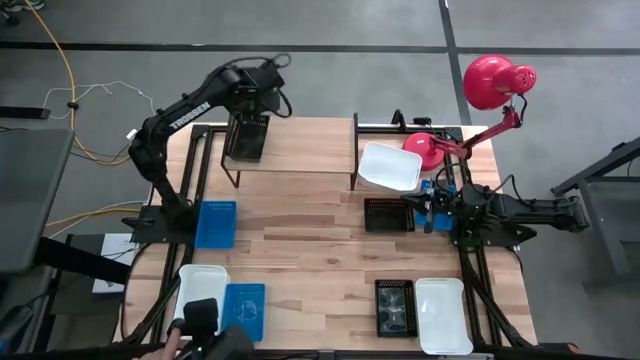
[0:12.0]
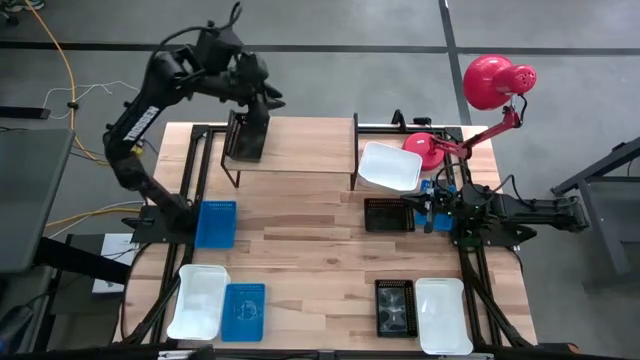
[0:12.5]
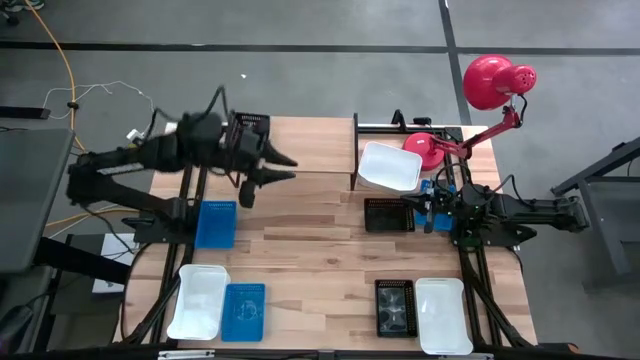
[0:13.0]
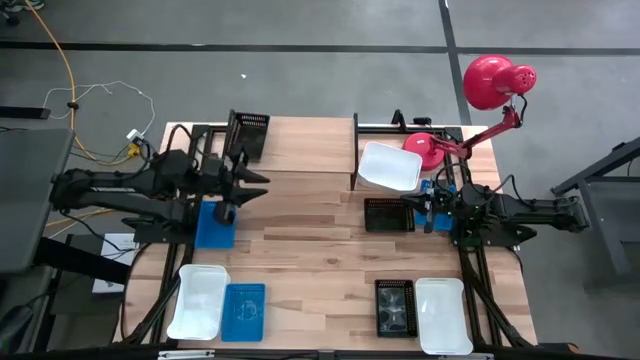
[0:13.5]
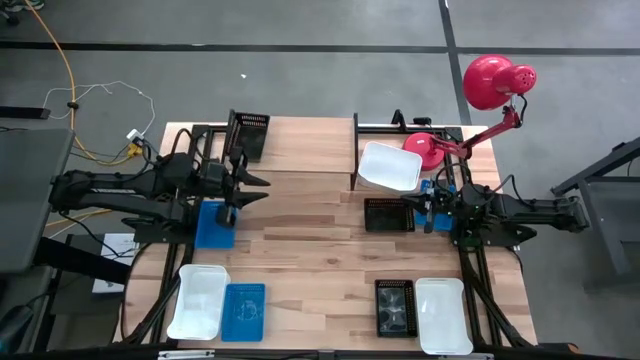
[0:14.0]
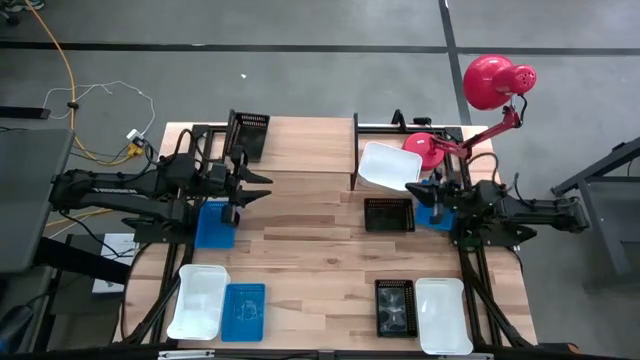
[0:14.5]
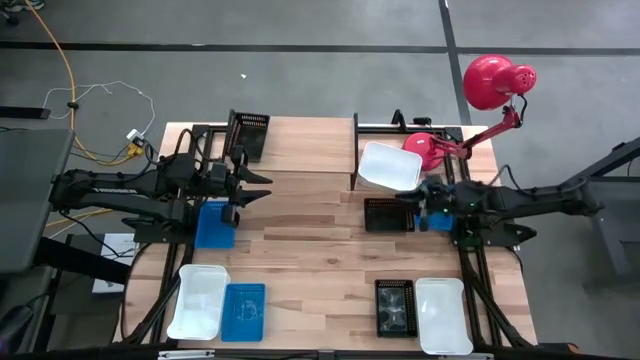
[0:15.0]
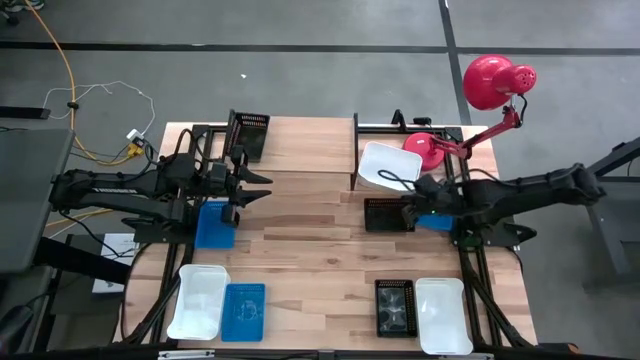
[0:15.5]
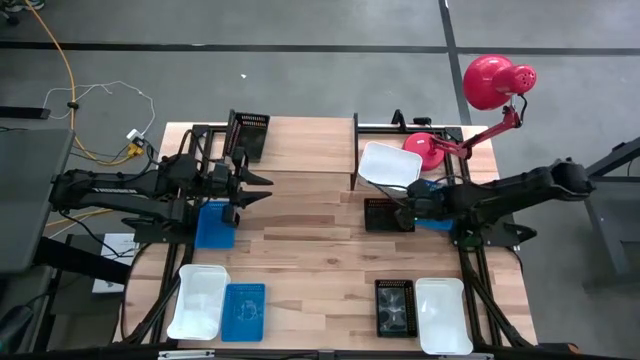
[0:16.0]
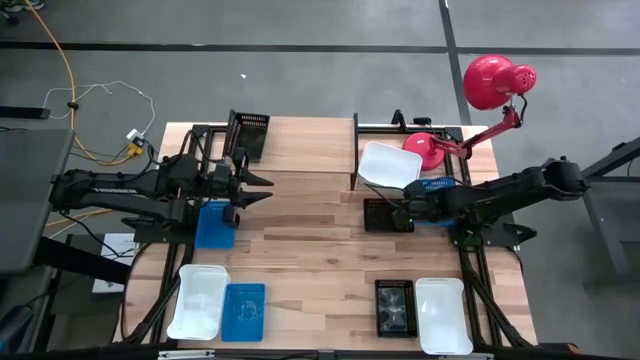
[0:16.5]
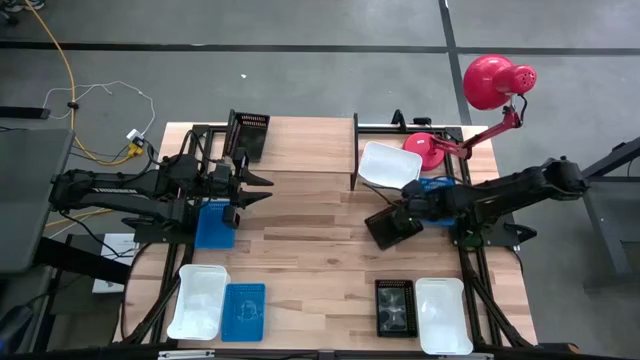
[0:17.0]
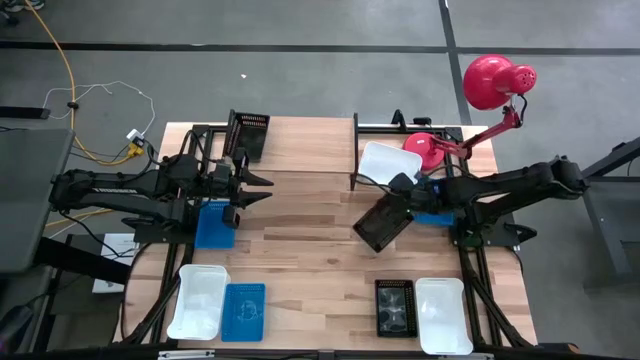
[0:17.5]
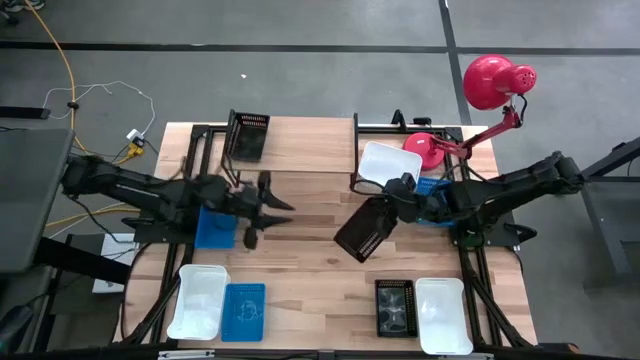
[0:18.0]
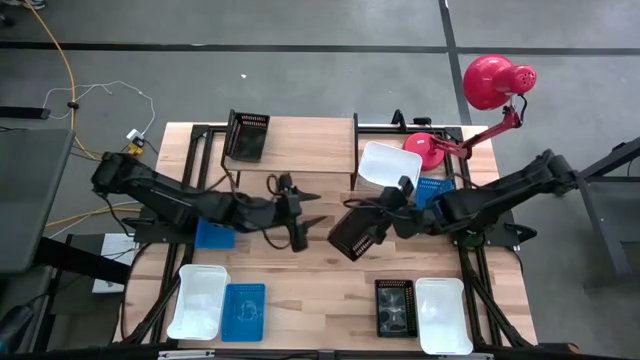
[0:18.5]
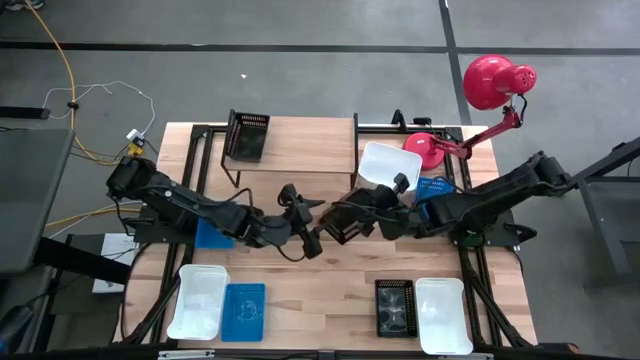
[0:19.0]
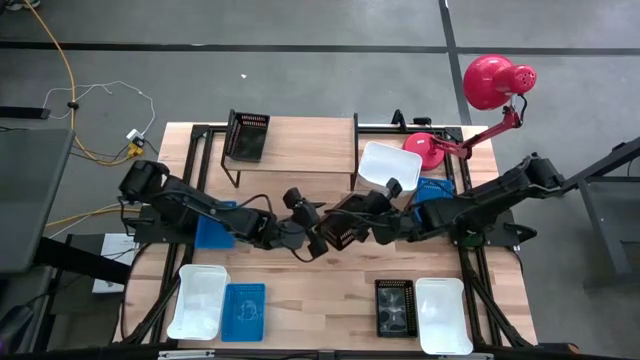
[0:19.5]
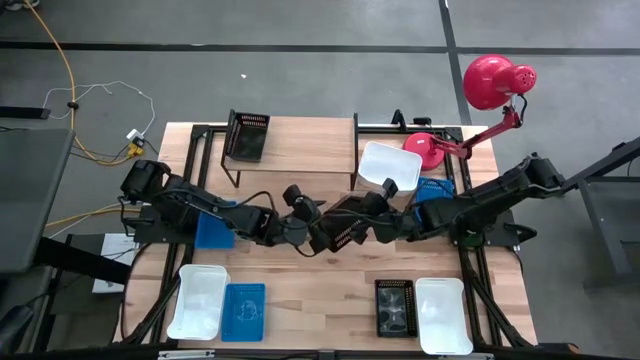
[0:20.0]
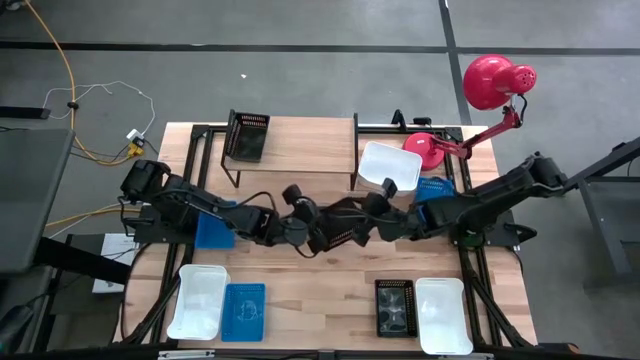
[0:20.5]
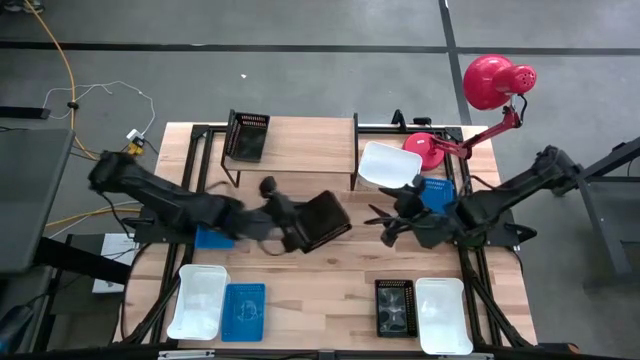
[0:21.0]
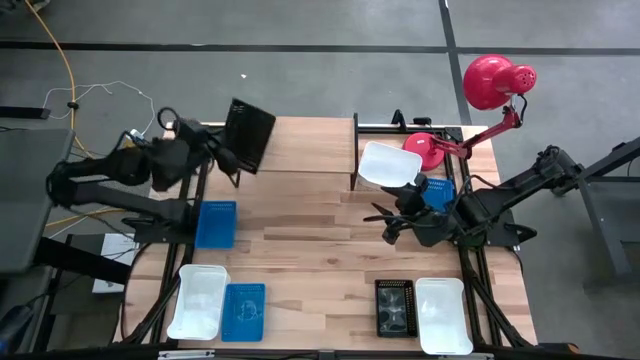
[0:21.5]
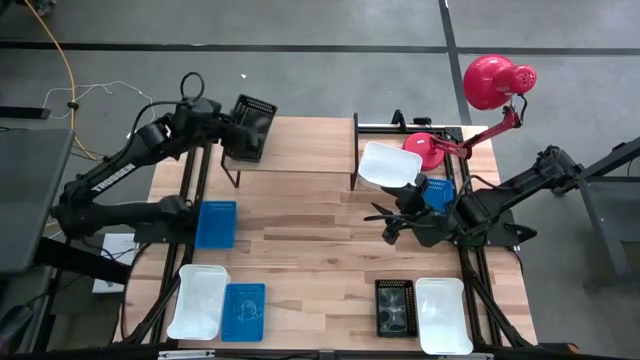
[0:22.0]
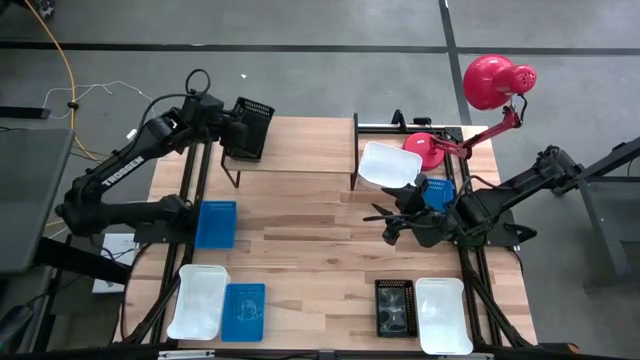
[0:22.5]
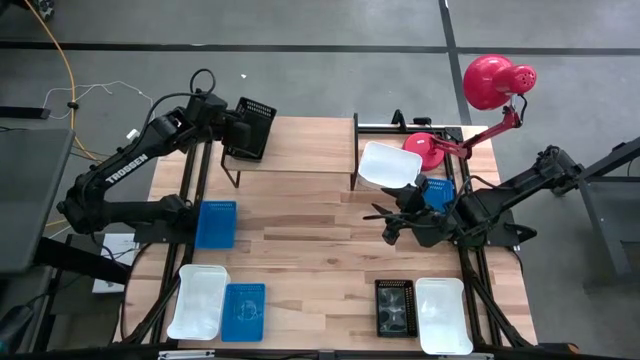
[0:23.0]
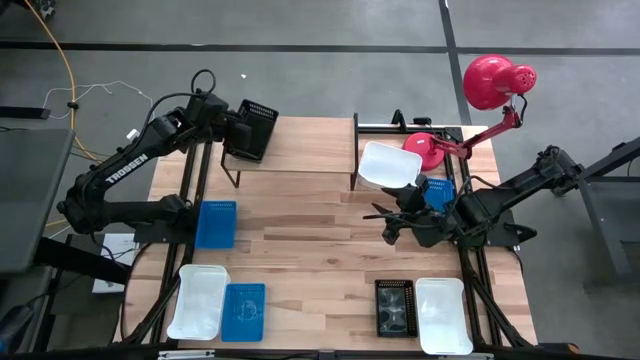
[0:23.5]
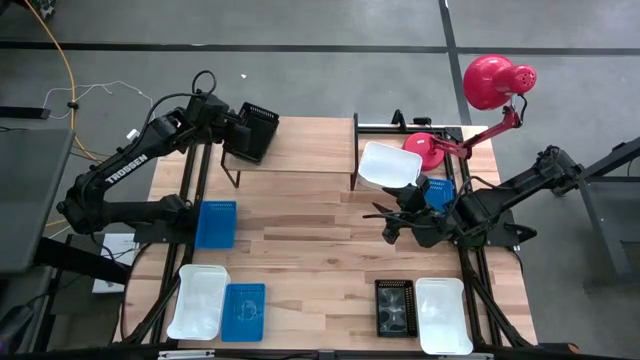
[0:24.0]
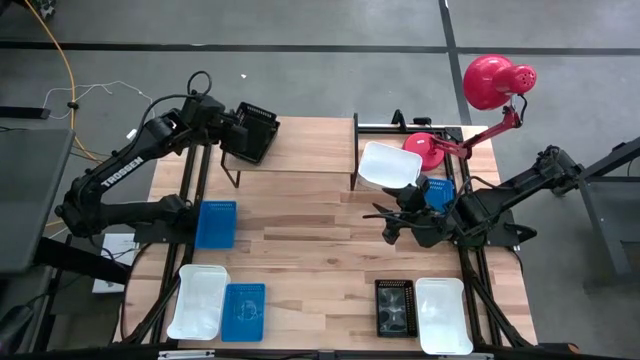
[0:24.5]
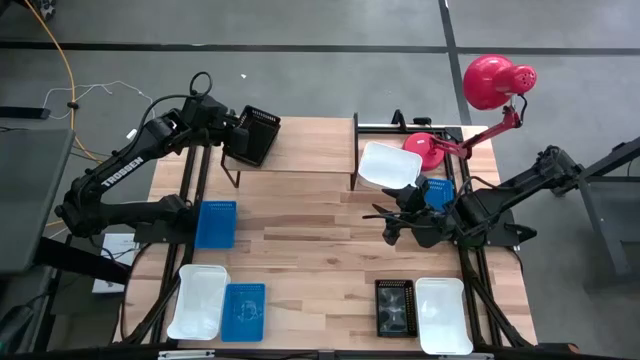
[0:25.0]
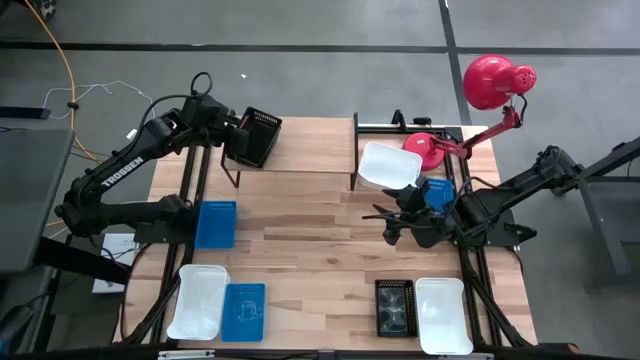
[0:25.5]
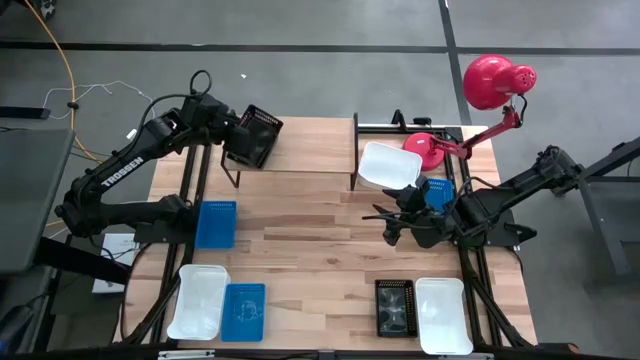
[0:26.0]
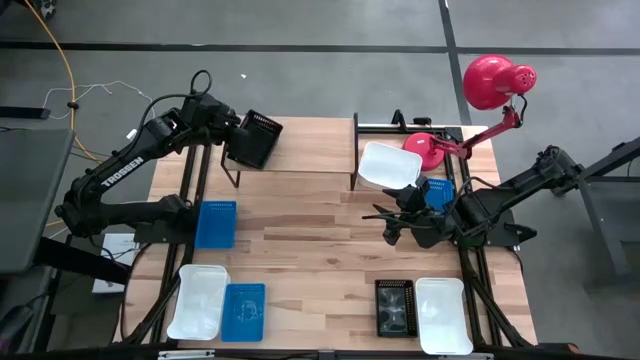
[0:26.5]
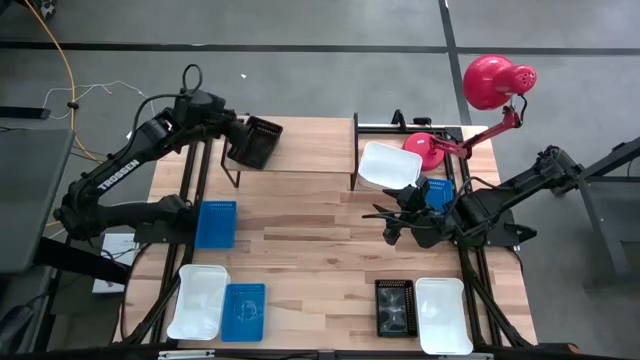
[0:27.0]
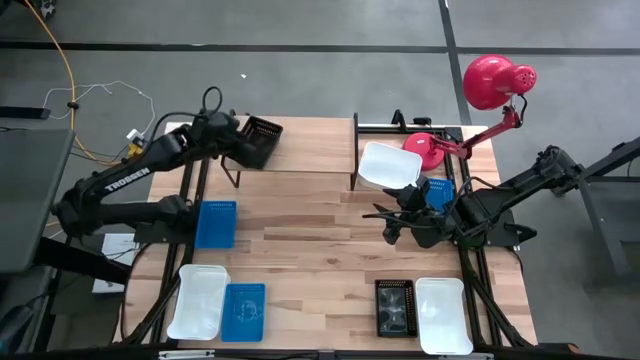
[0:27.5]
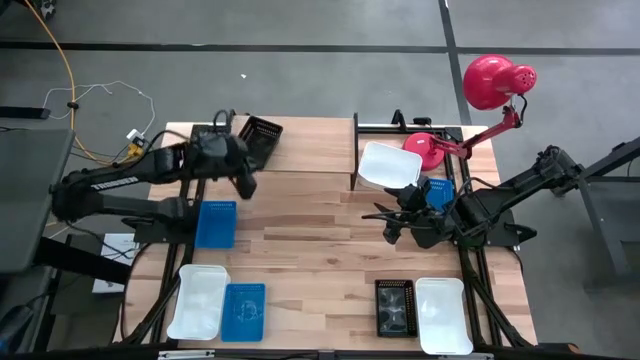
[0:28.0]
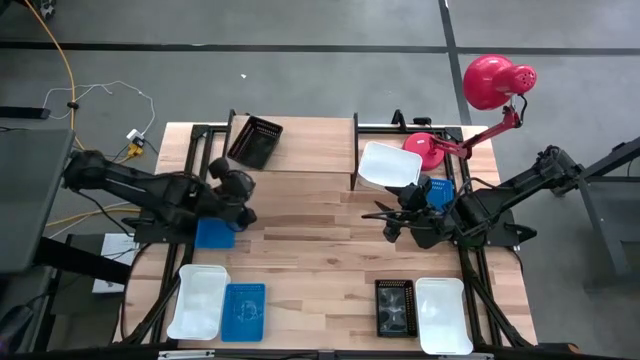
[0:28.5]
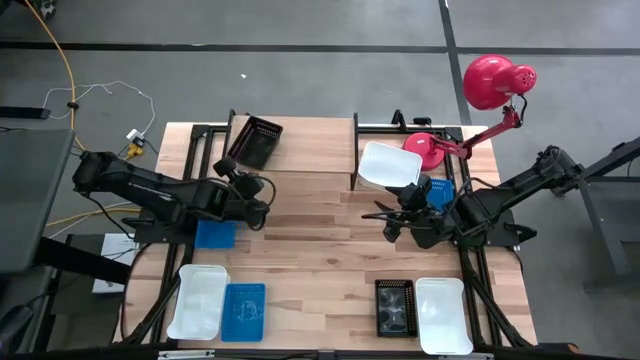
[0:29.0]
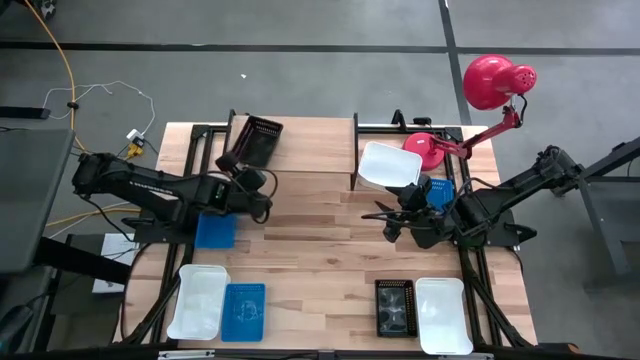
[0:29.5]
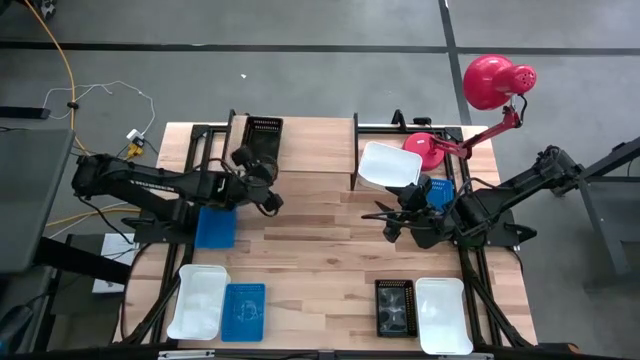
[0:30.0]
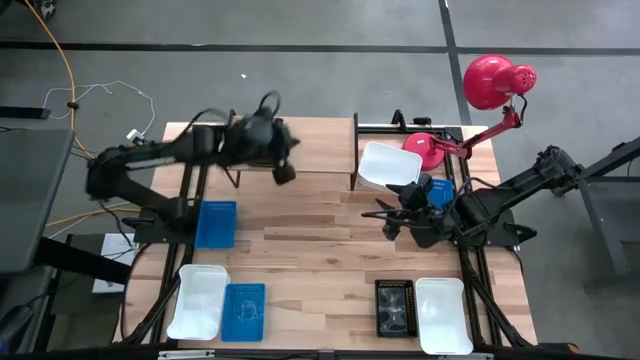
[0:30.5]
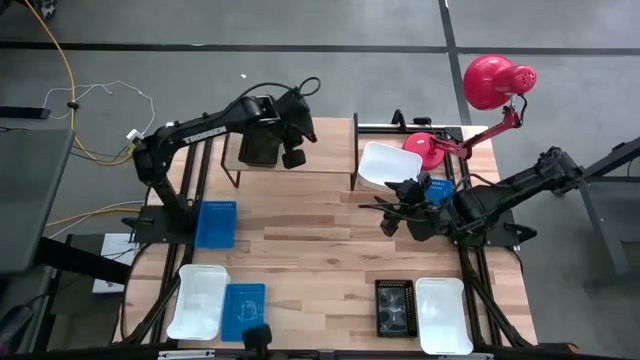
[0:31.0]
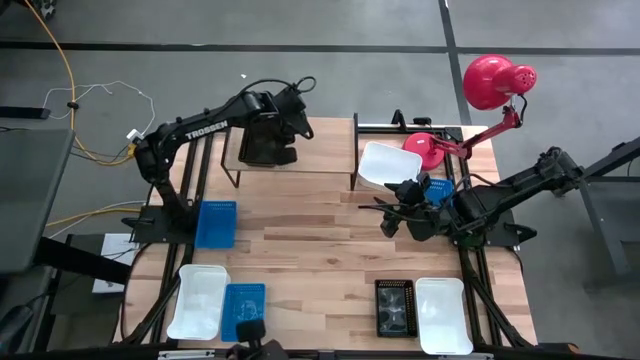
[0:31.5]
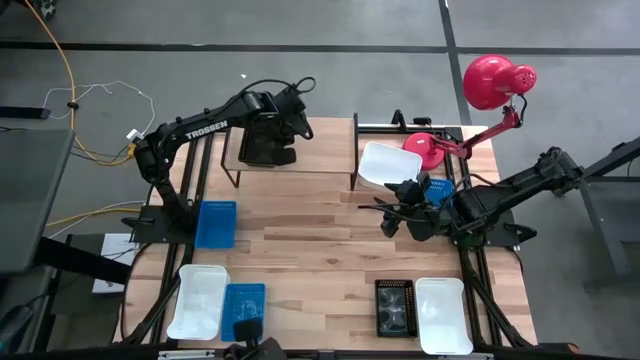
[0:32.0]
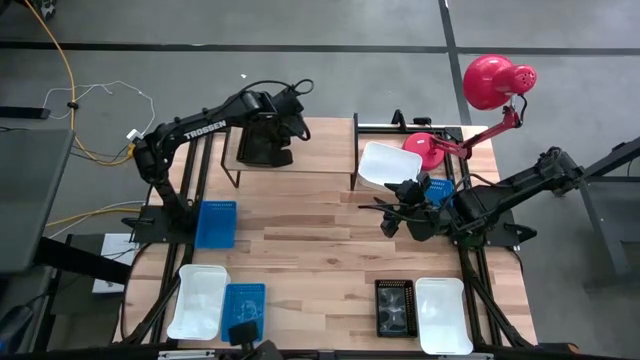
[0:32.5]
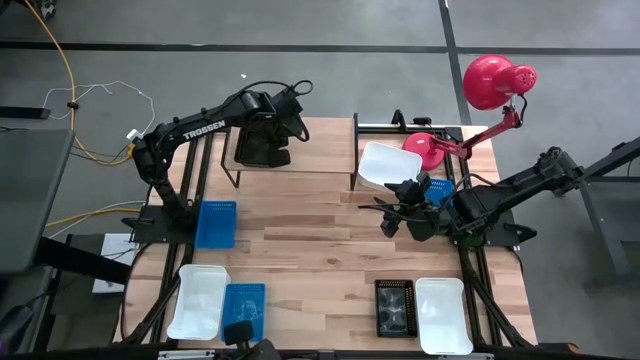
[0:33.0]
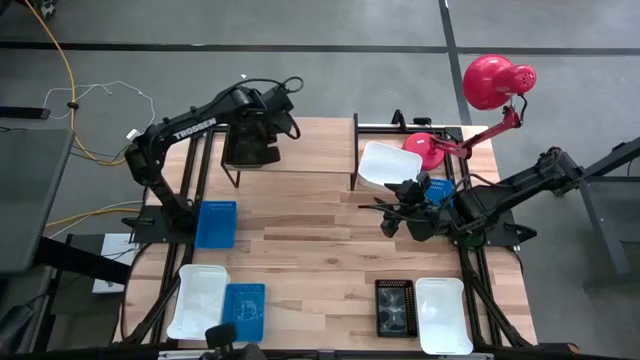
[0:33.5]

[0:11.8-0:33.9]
Task: Stack baskets on shelf by color
Stack the top right black bin on the black bin on the shelf
